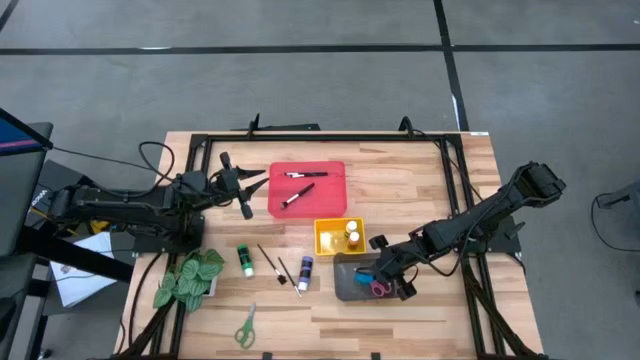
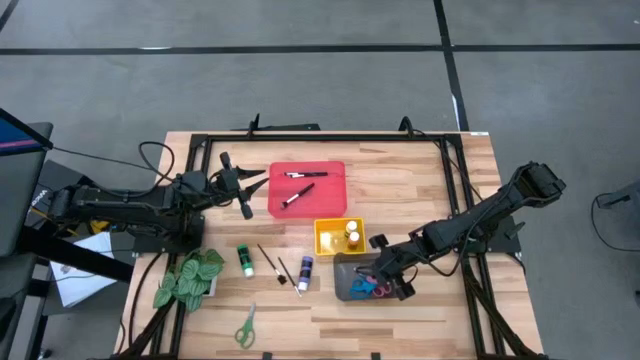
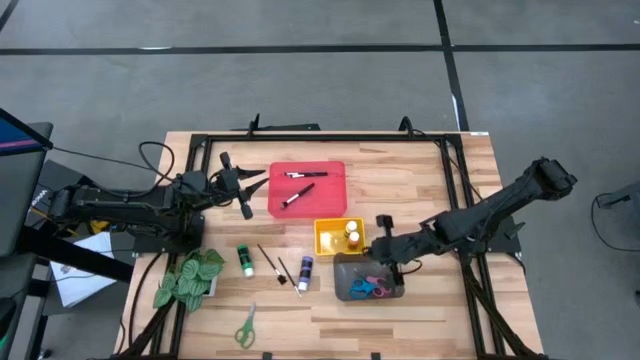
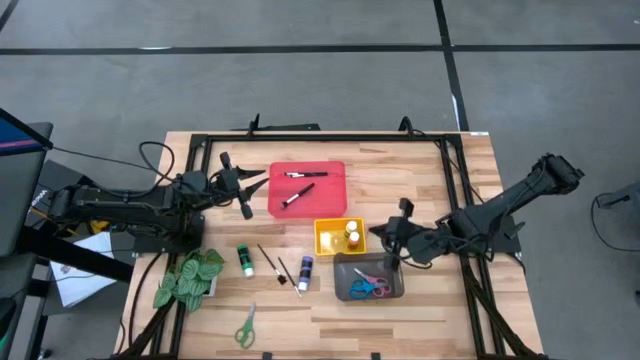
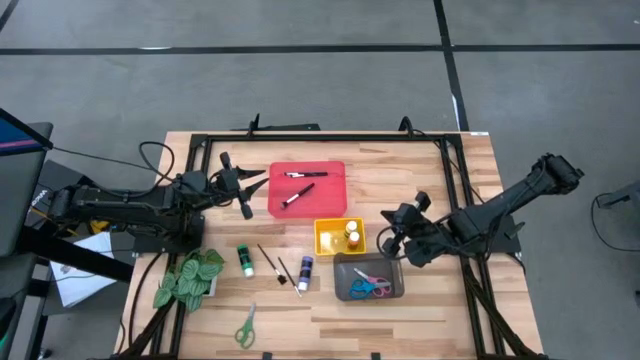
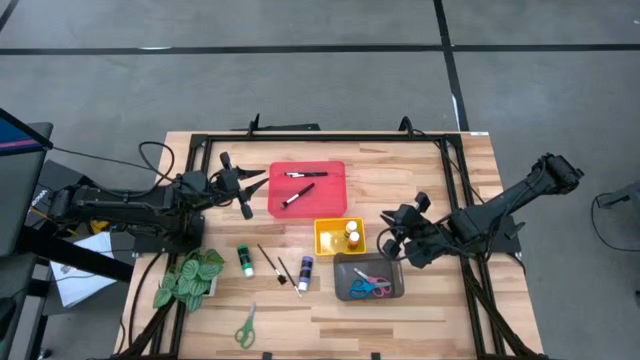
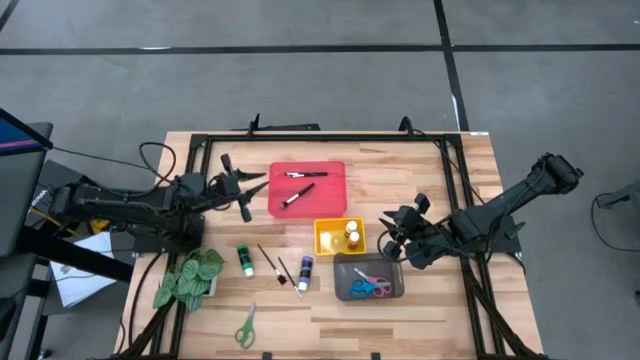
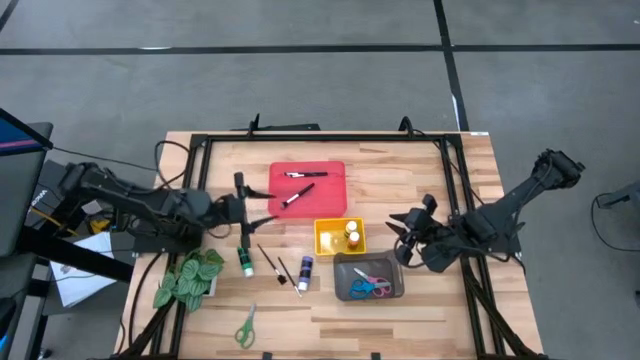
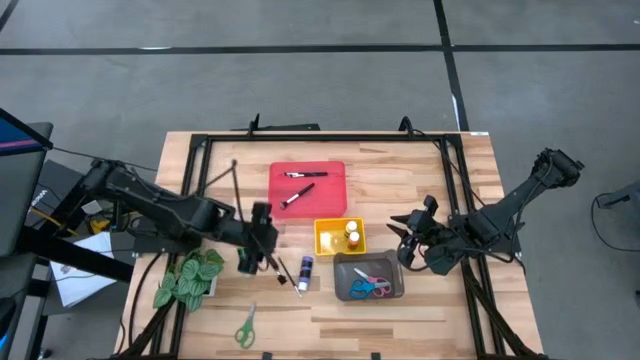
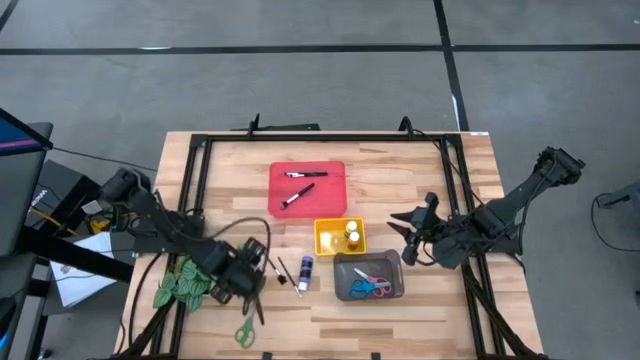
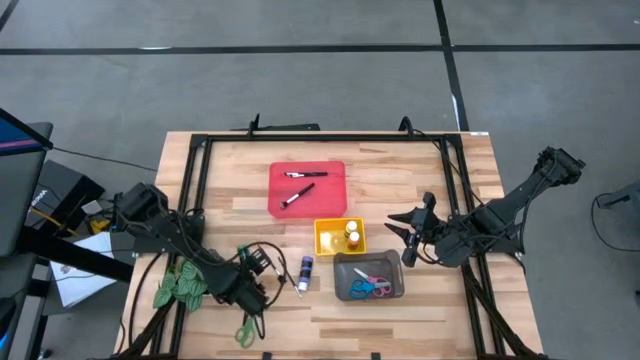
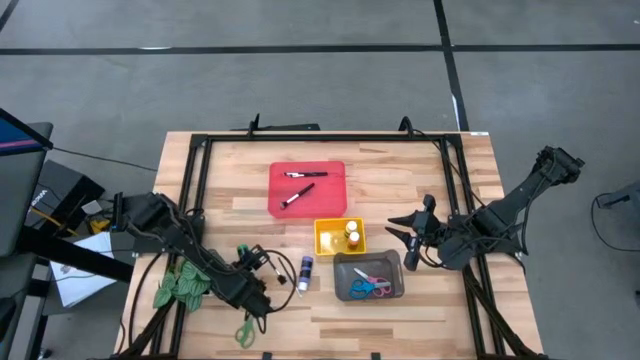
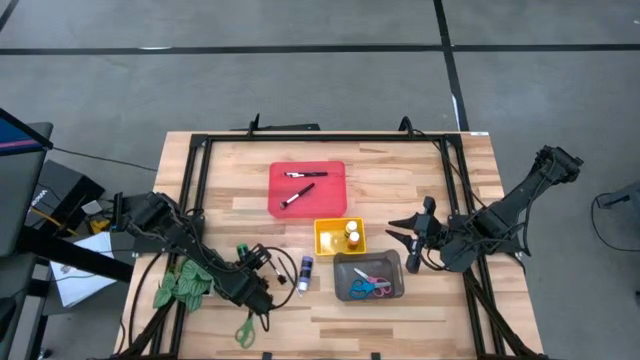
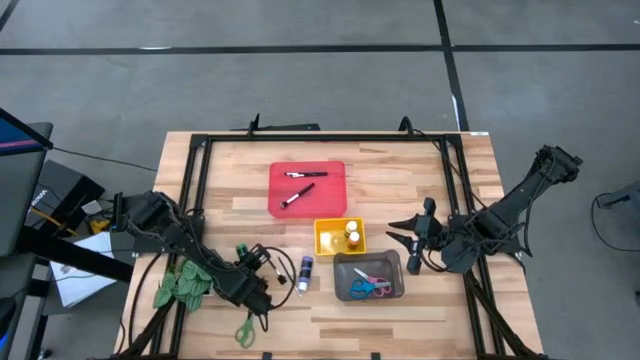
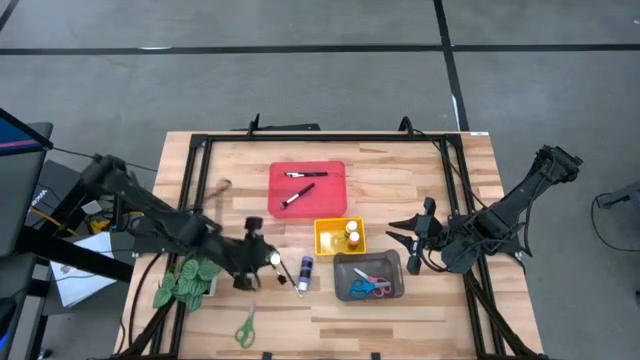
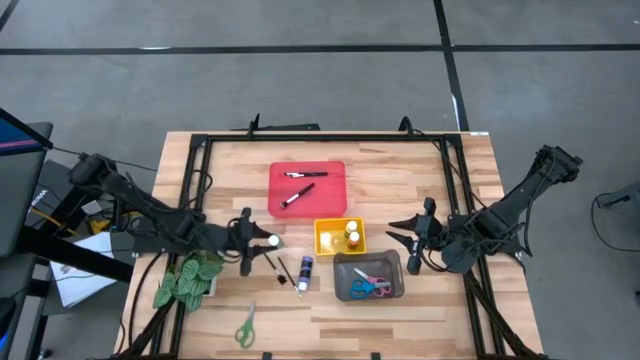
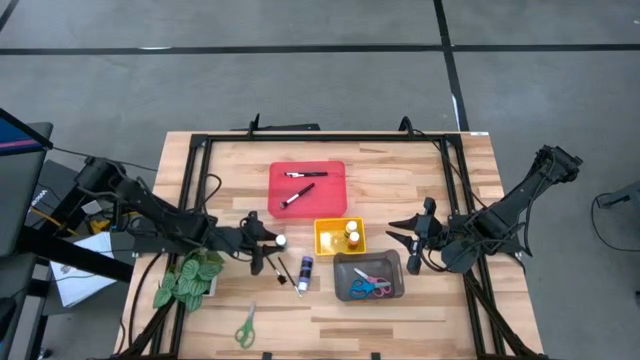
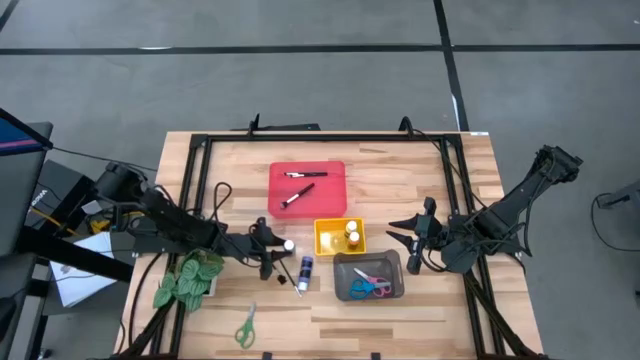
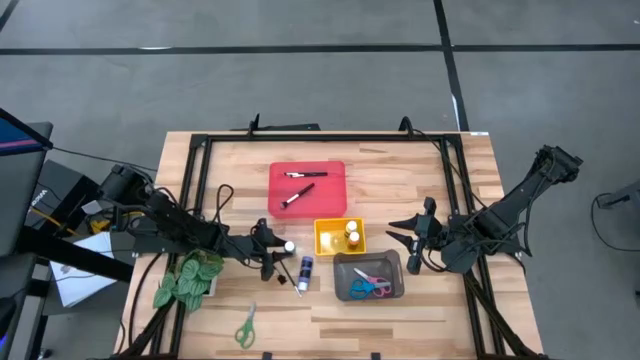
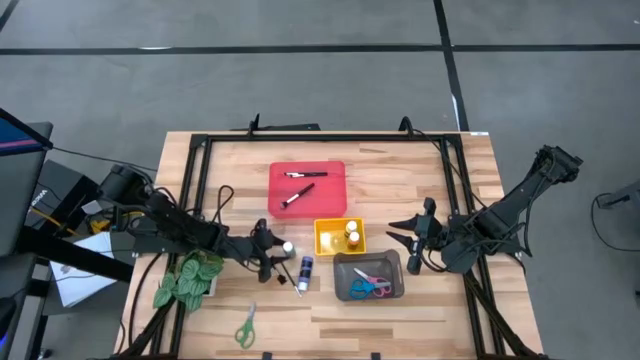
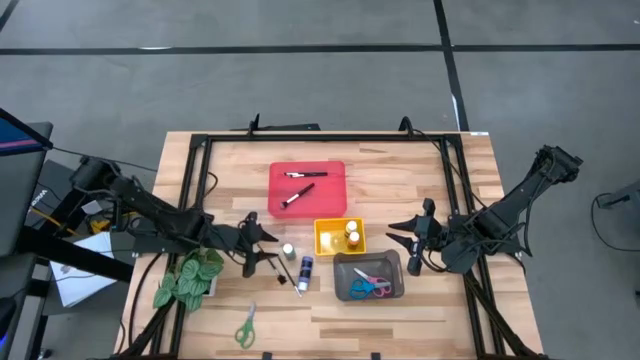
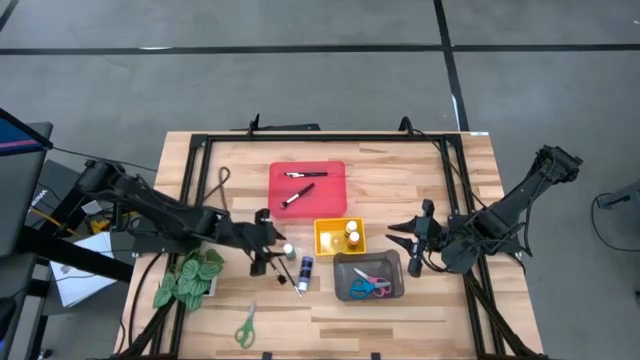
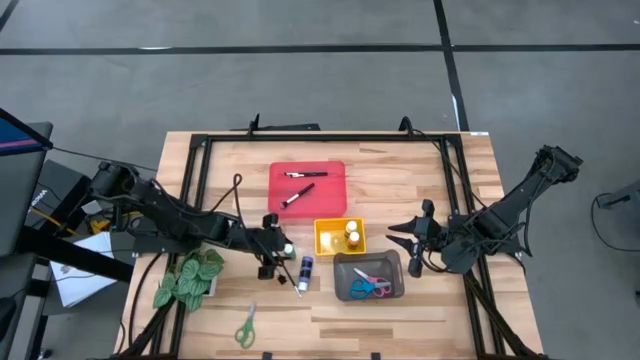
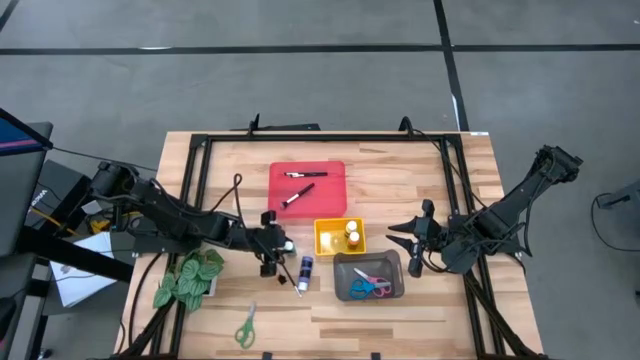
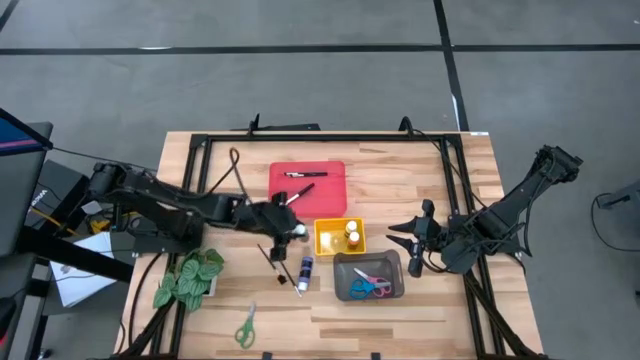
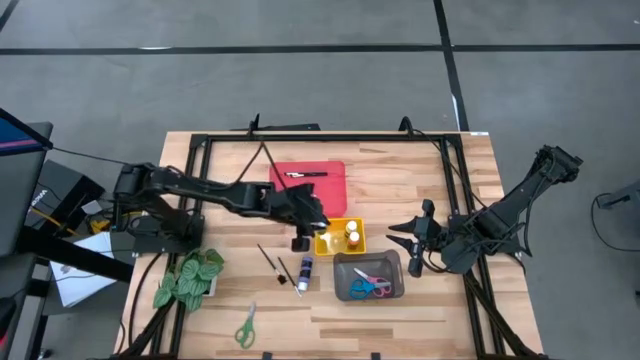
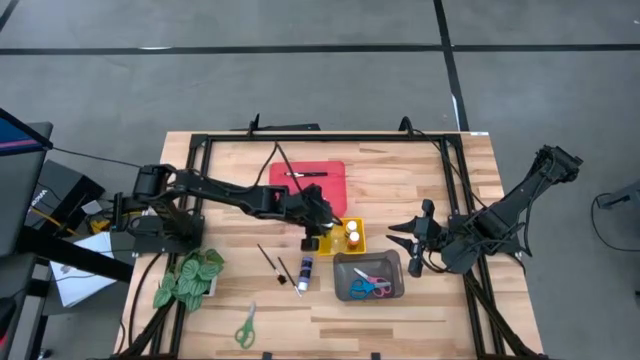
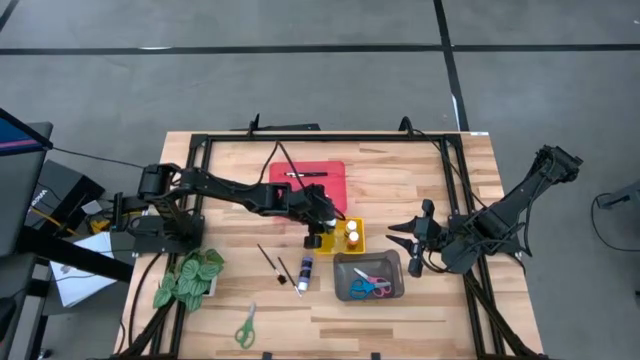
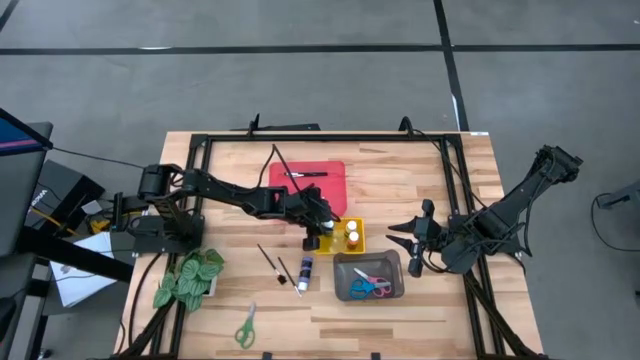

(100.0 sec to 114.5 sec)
Task: Pick & Place Paint Supplies
Put the green paint bottle into the yellow bin

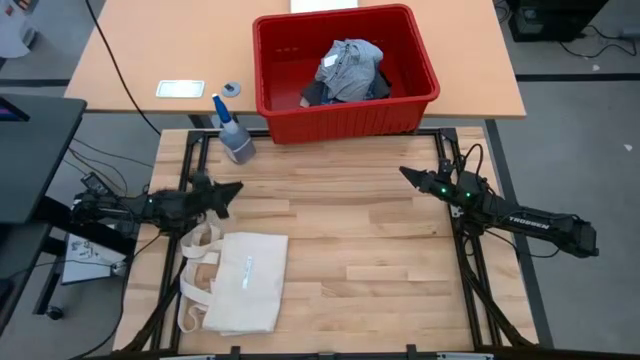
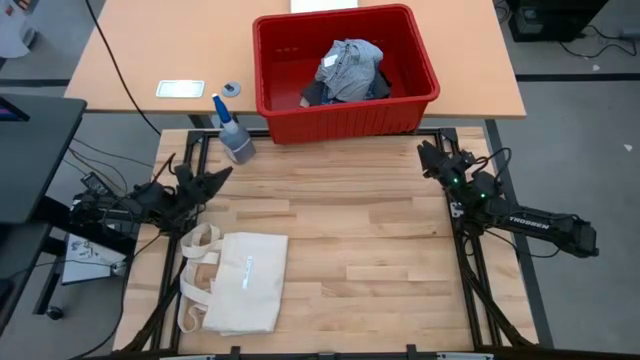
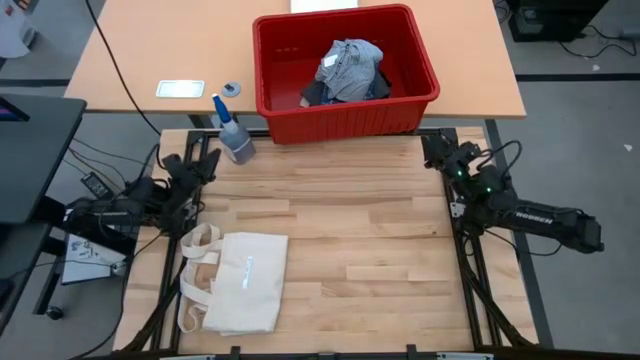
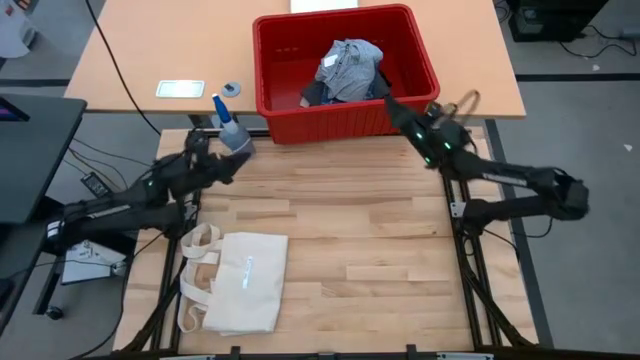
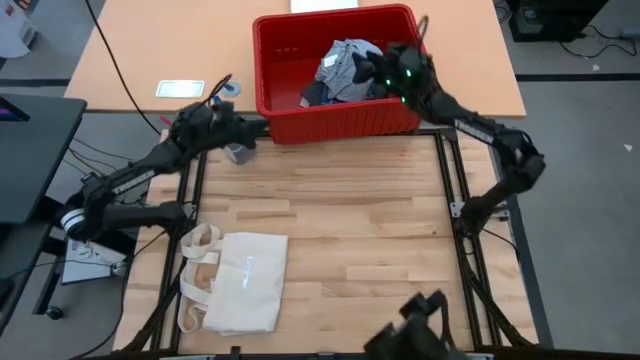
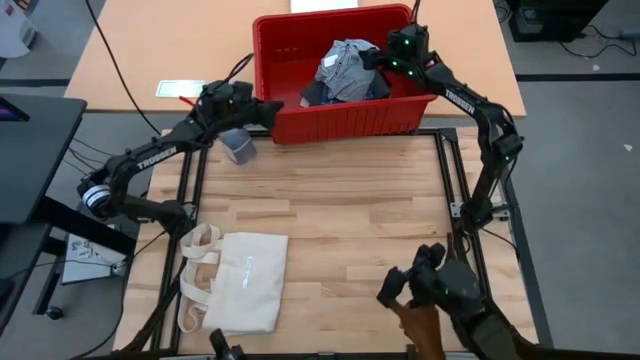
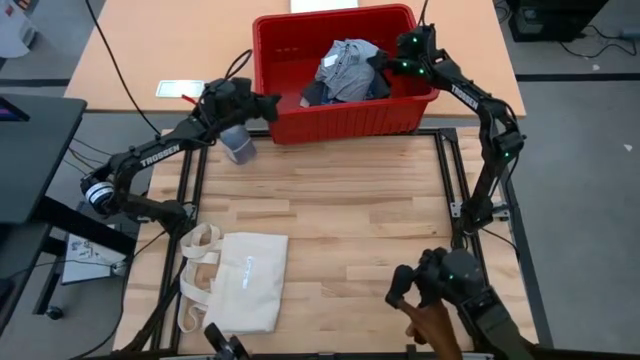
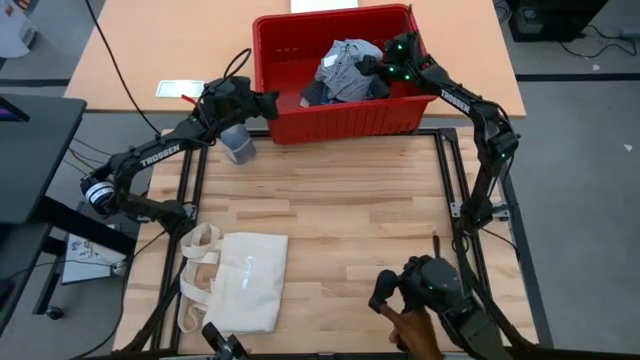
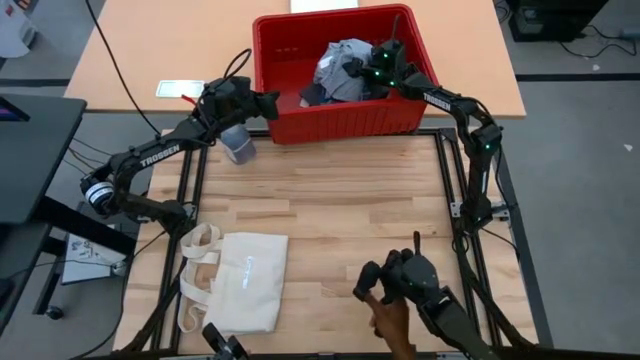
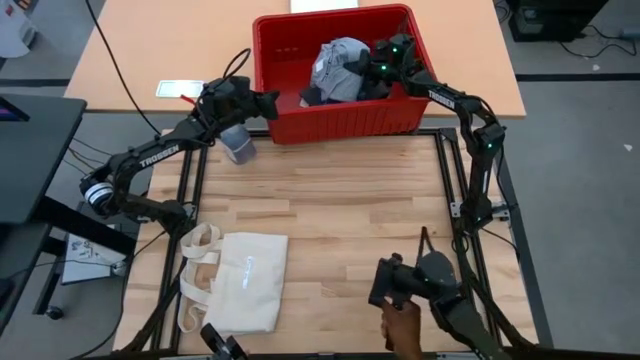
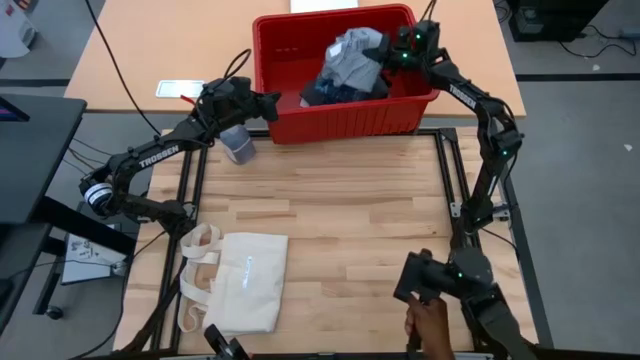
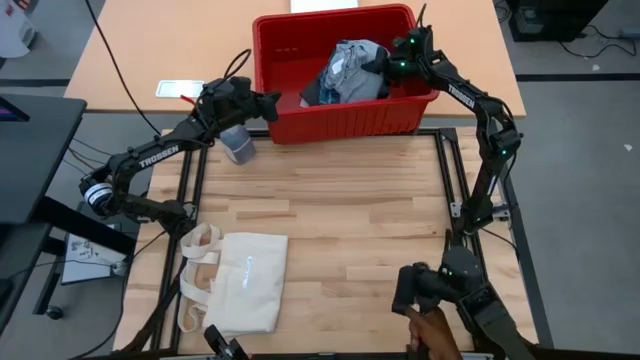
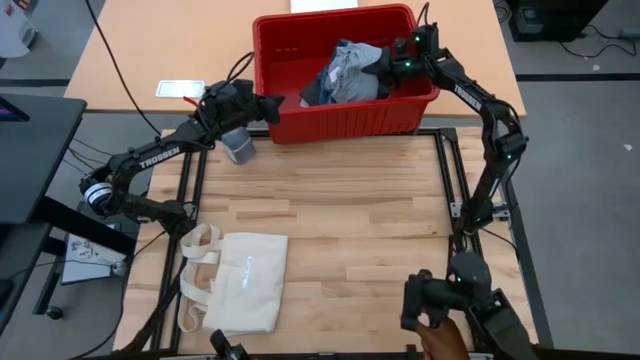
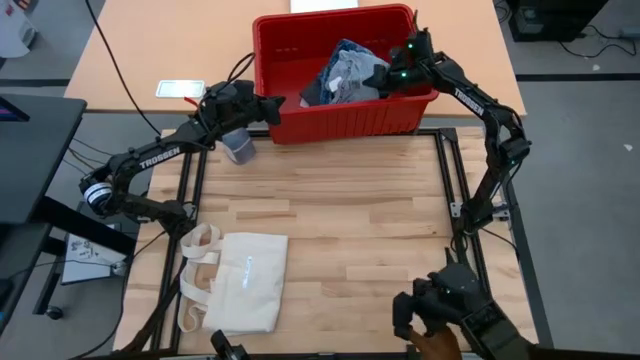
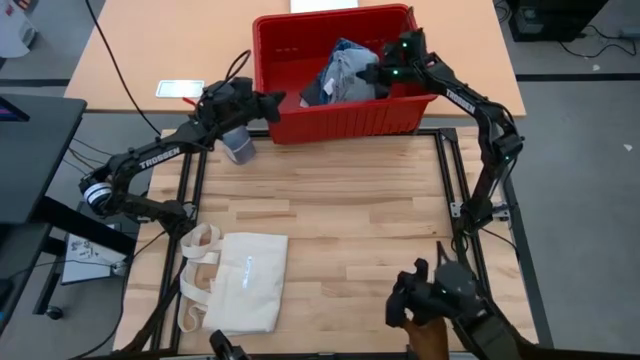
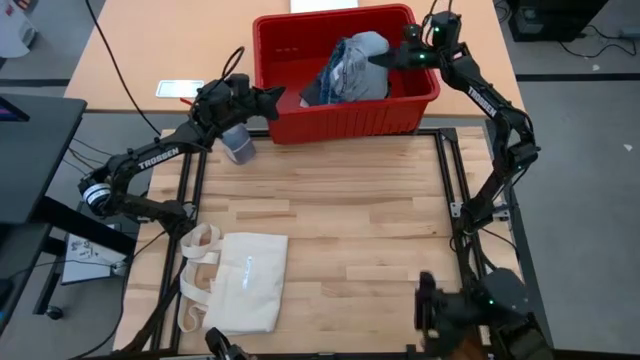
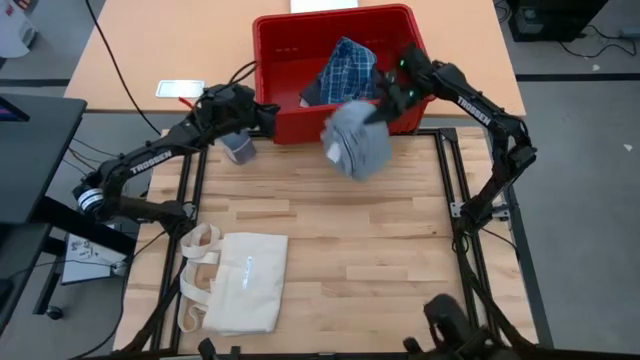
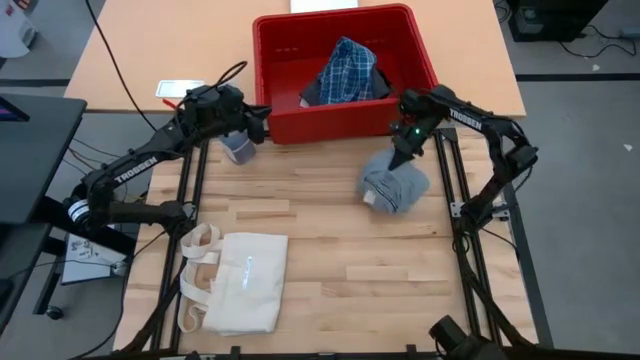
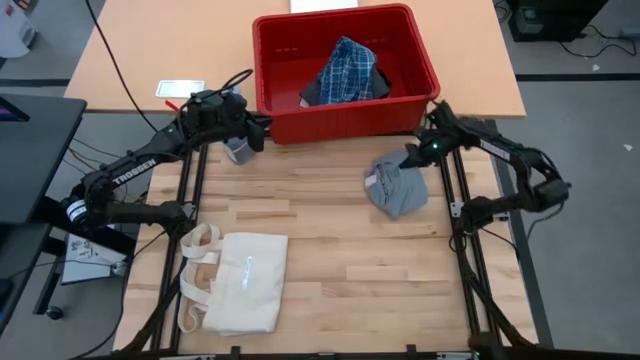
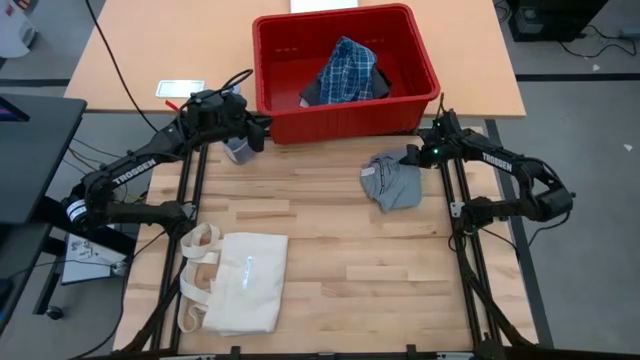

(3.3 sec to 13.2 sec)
Task: Fold laundry
Remove the folded gray shirt from the red bin
